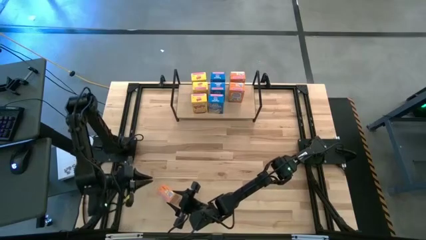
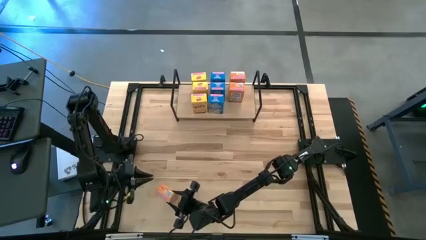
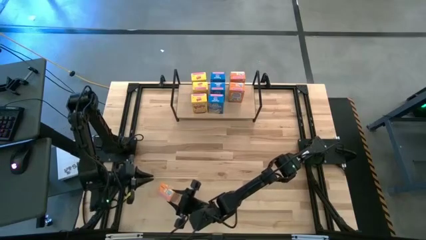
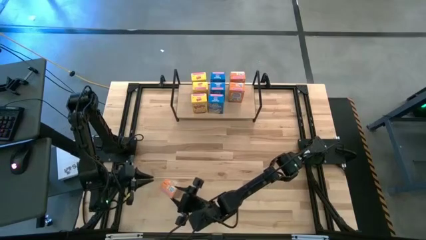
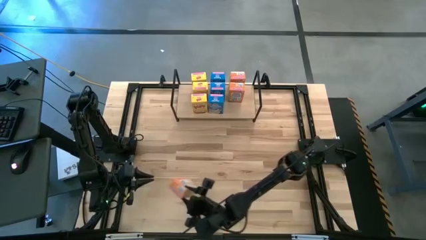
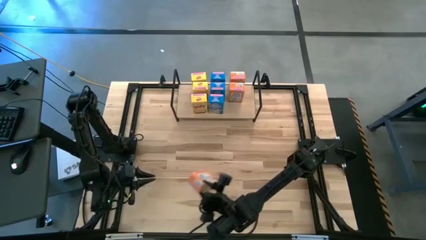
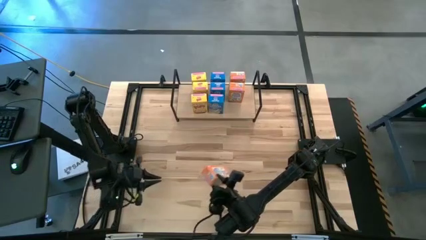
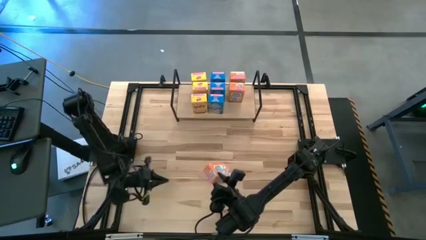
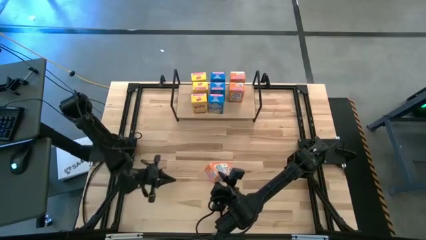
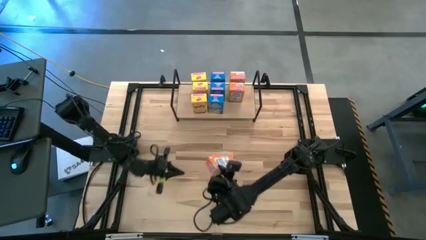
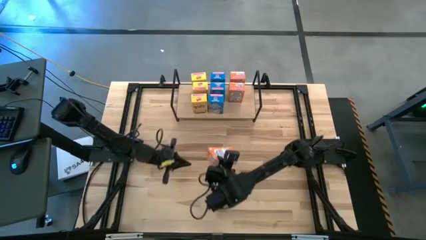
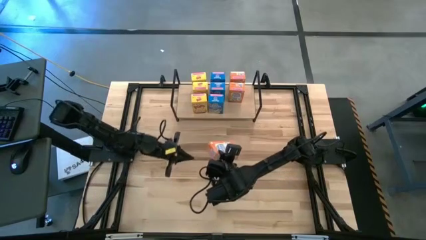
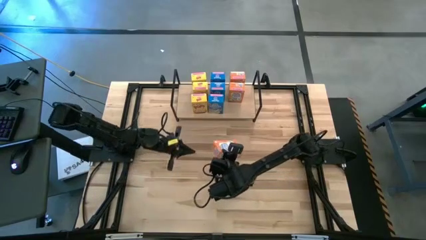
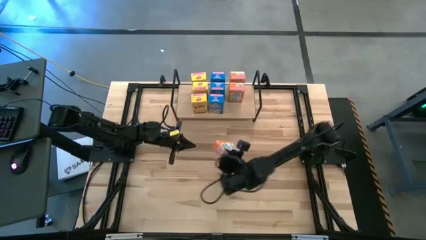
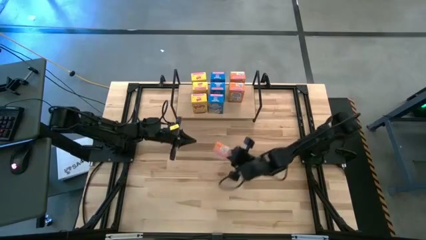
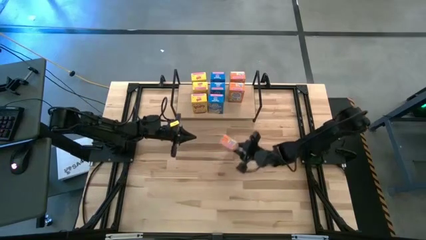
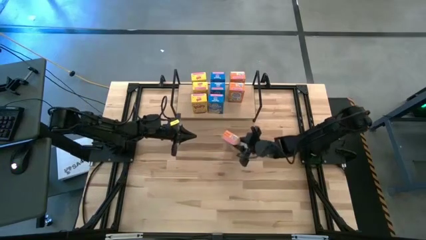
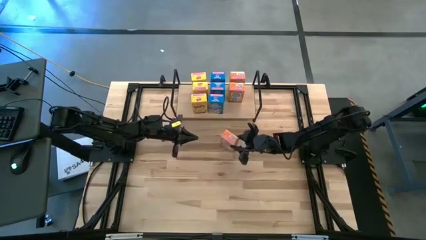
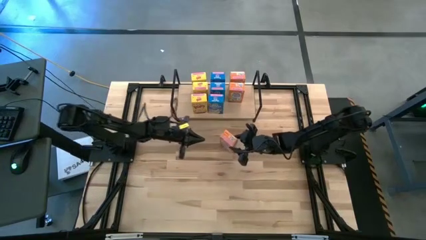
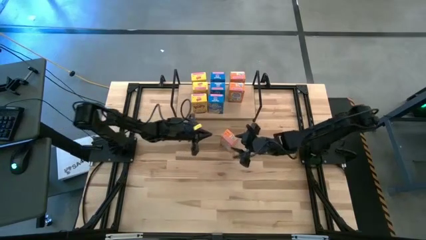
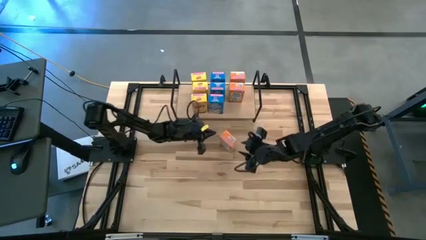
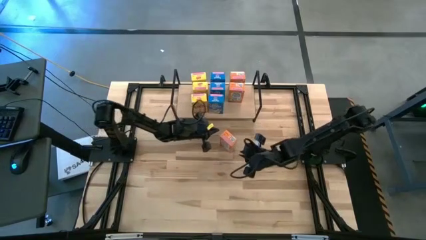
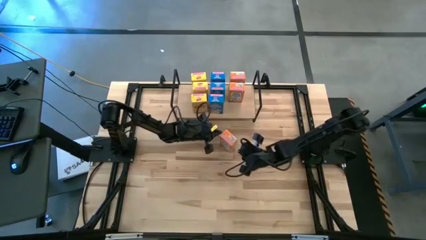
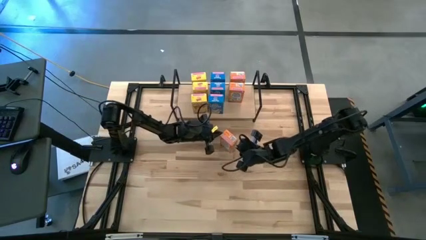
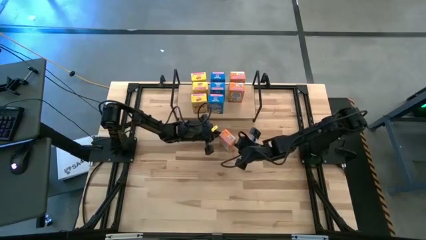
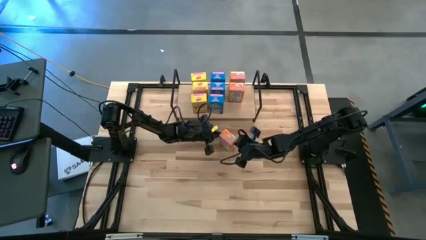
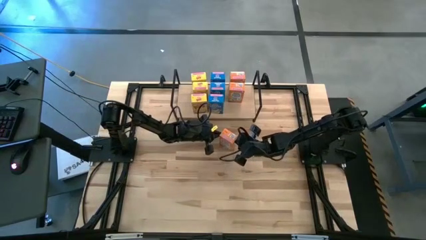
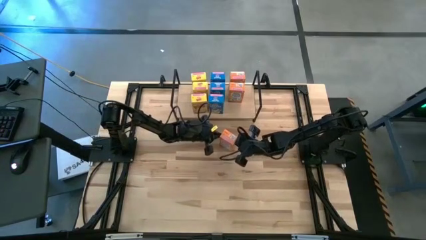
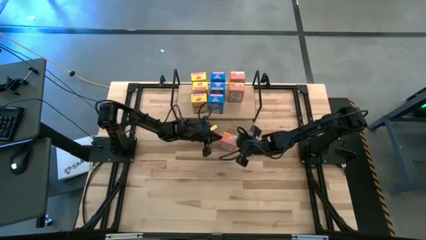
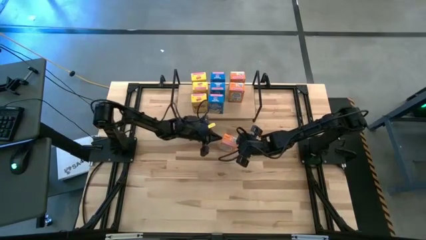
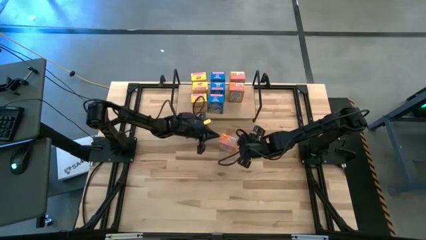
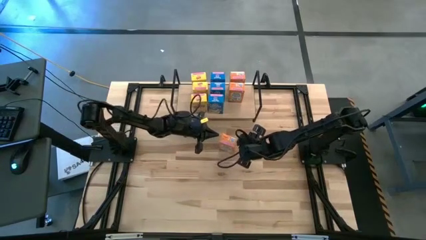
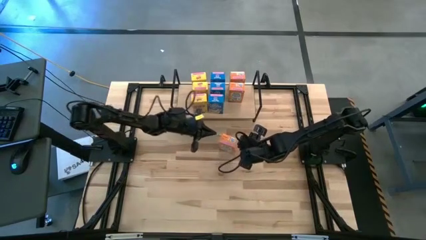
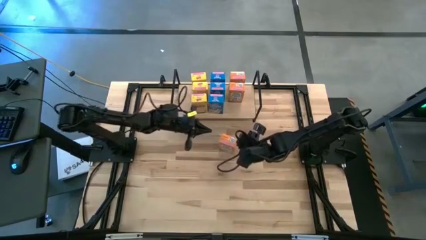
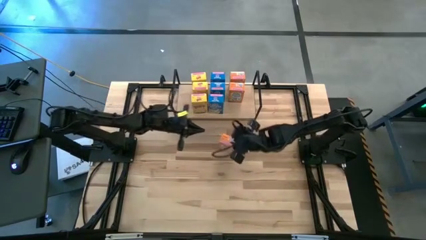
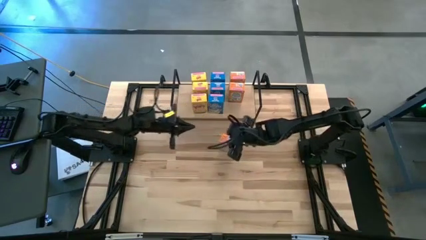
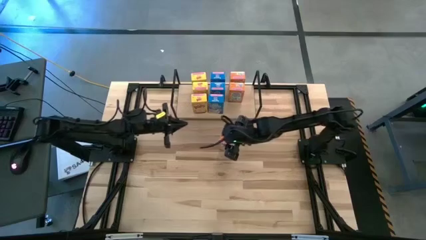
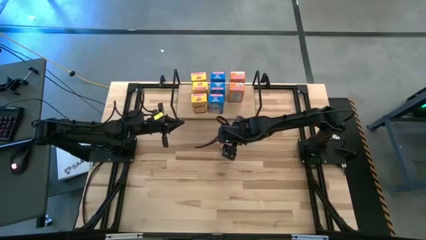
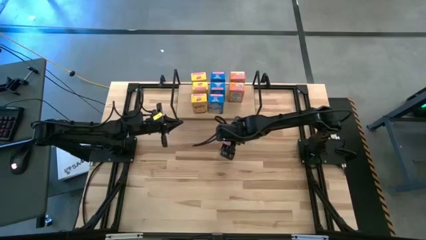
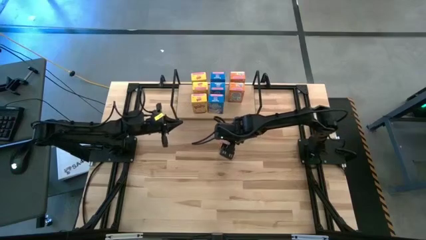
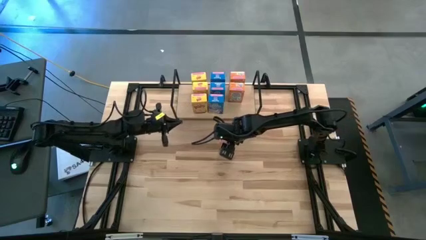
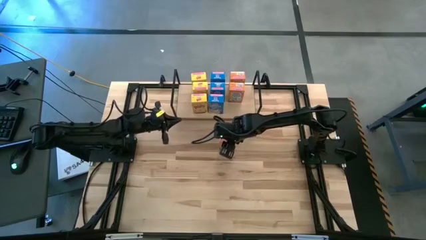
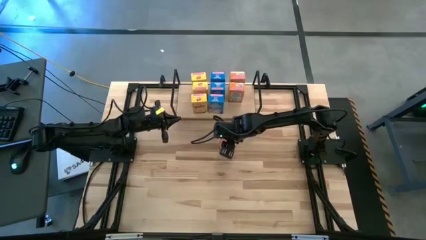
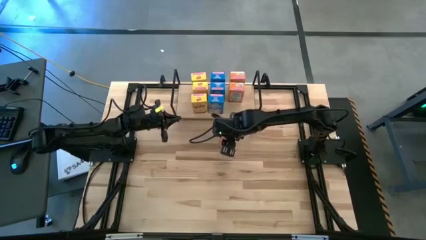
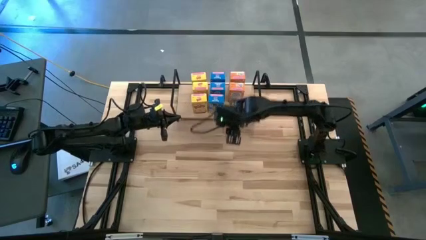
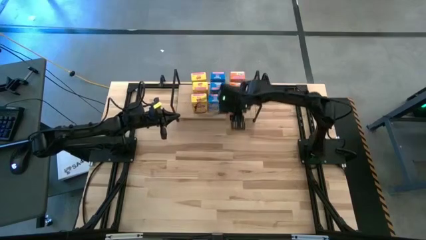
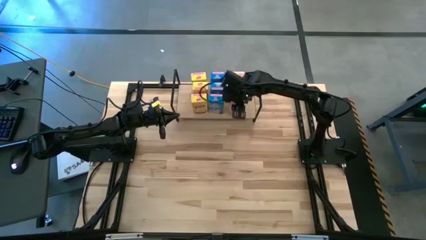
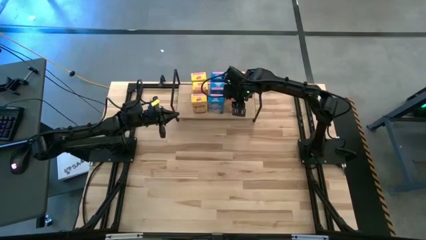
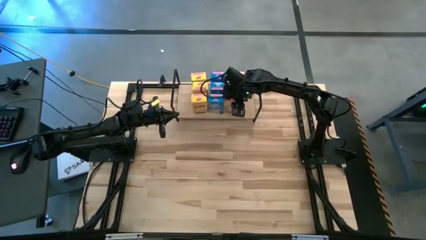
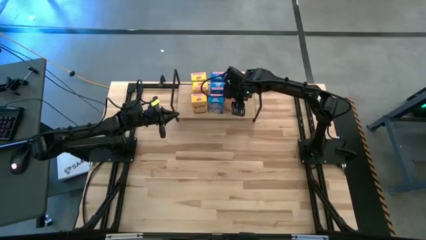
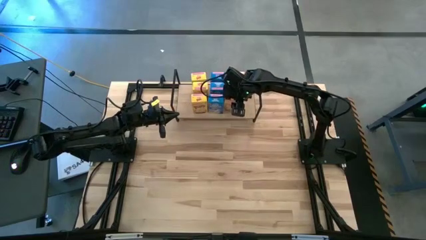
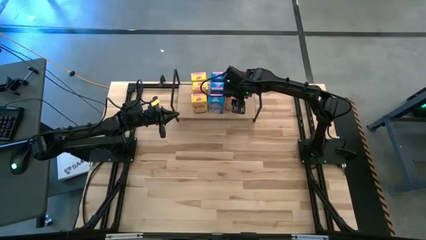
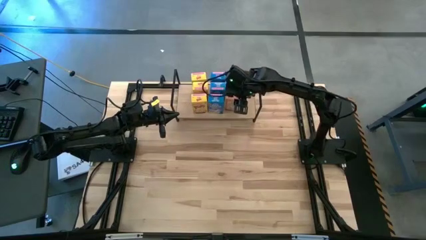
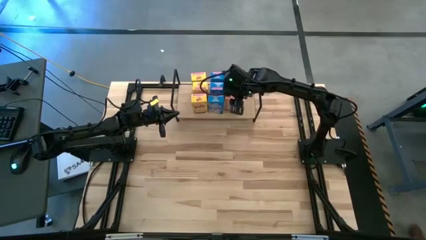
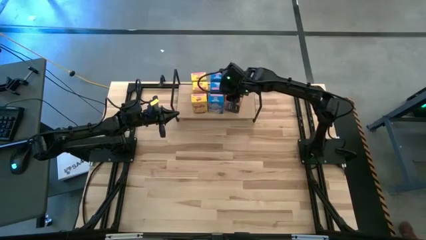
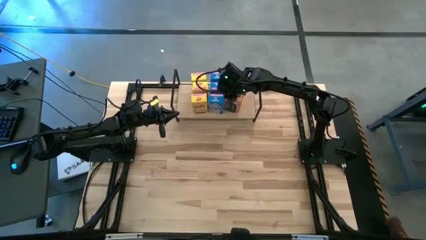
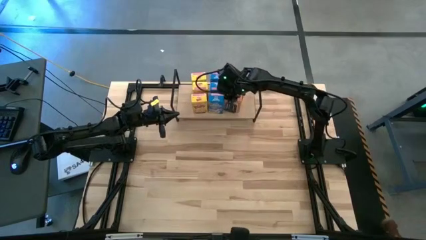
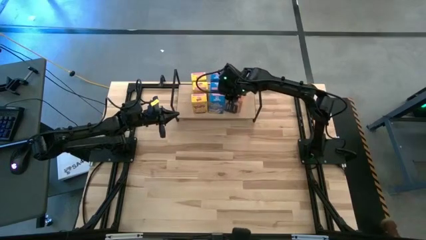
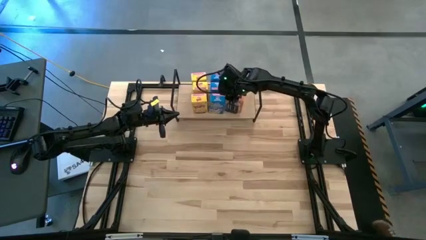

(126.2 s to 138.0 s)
Task: Stack cereal on shelf
Put the orange cereal box on the shelf aligned with the other orange cereal boxes
